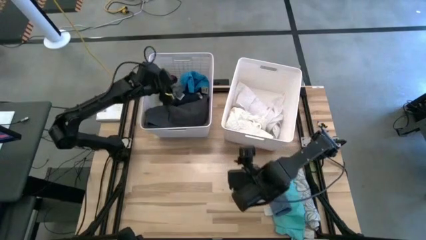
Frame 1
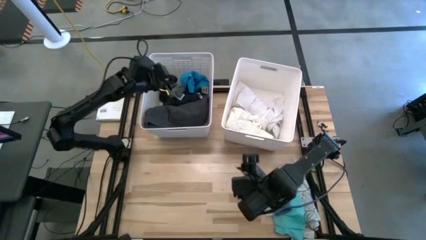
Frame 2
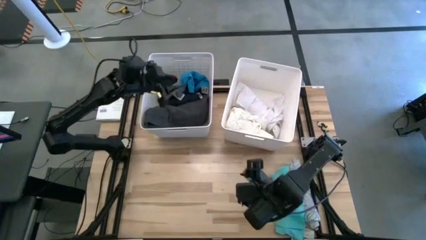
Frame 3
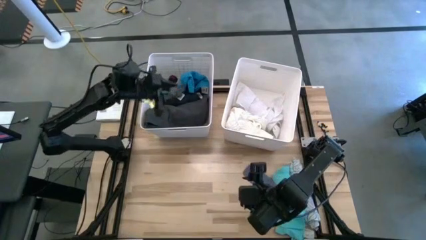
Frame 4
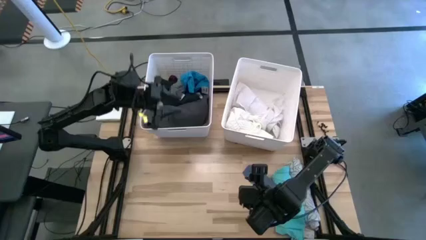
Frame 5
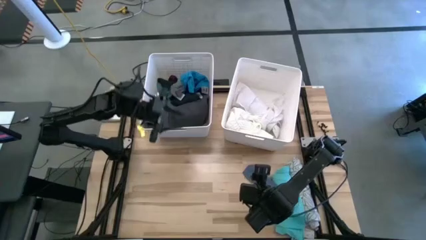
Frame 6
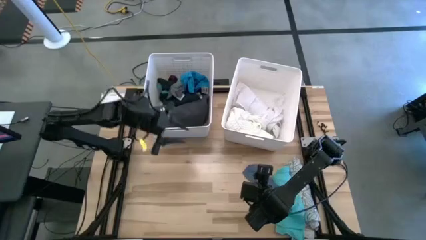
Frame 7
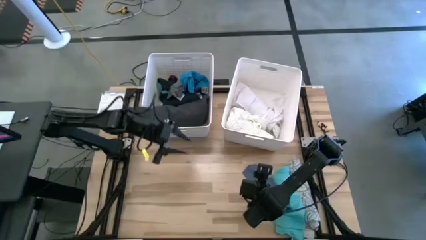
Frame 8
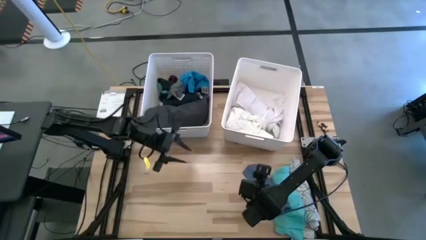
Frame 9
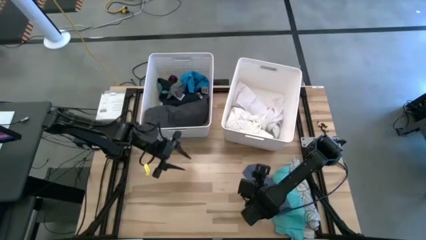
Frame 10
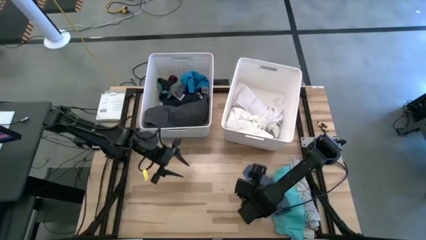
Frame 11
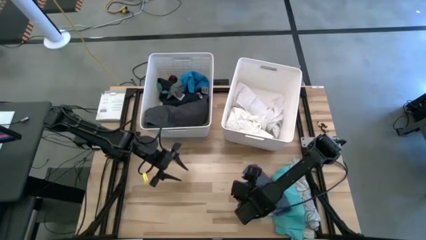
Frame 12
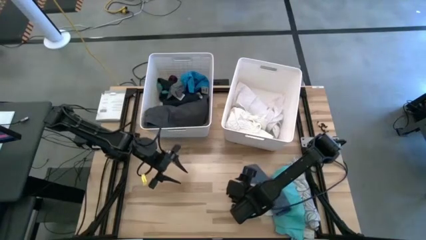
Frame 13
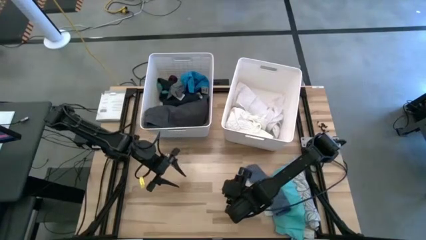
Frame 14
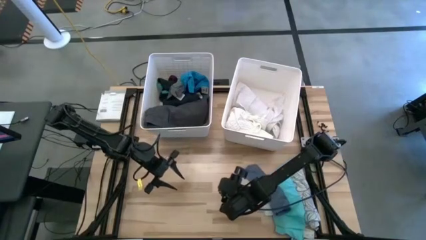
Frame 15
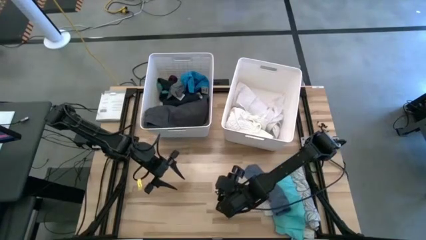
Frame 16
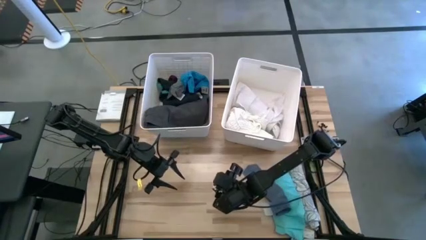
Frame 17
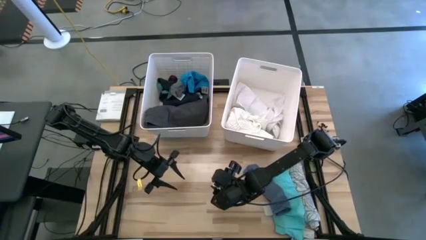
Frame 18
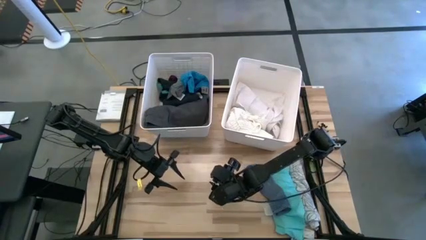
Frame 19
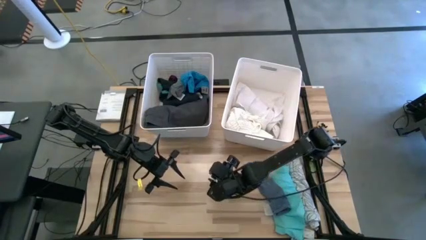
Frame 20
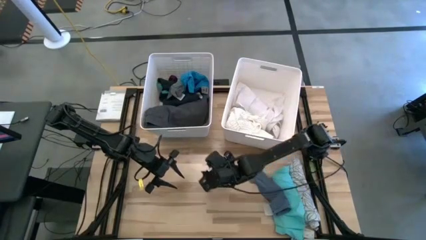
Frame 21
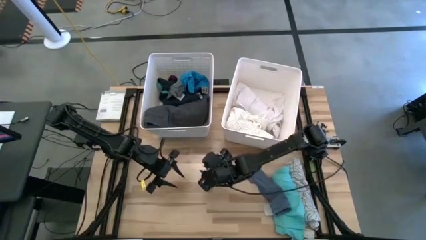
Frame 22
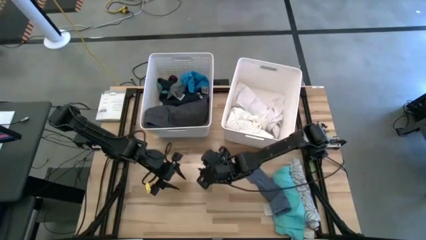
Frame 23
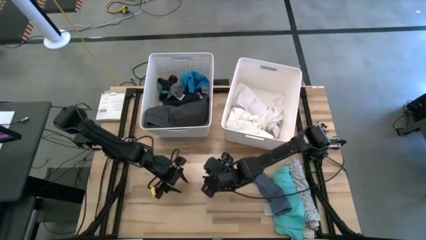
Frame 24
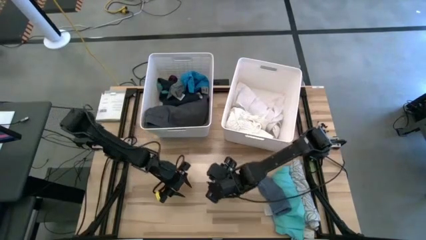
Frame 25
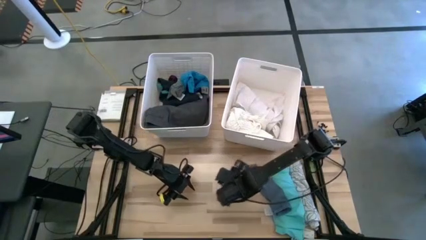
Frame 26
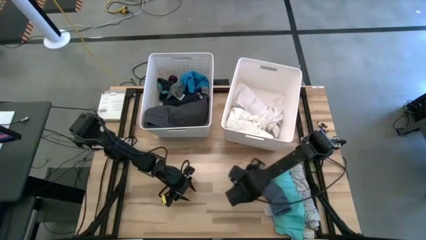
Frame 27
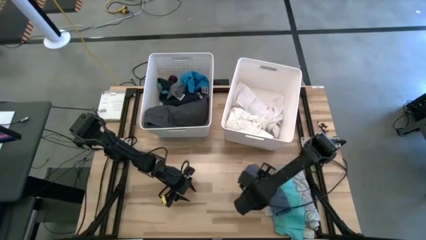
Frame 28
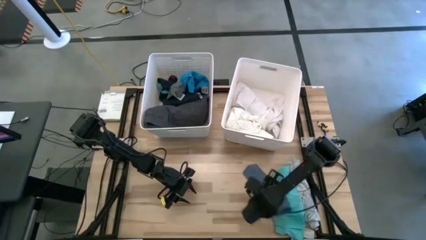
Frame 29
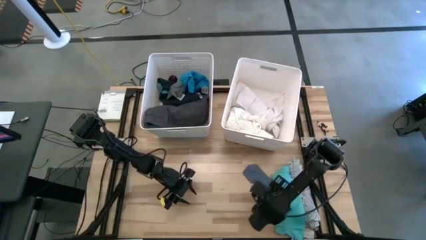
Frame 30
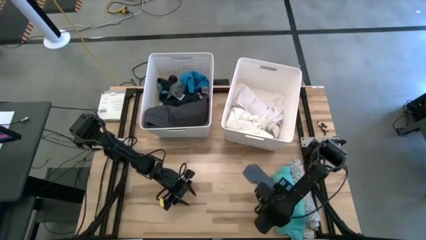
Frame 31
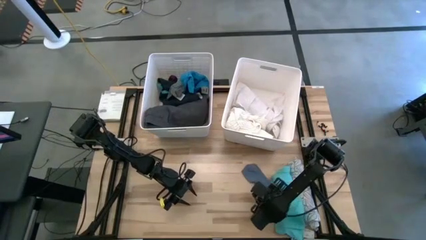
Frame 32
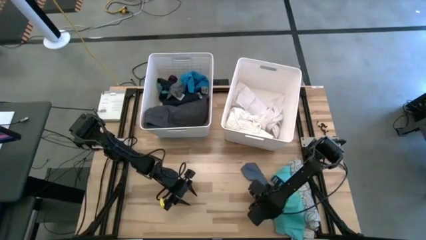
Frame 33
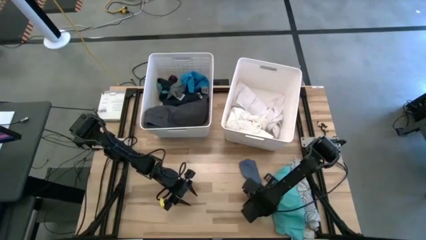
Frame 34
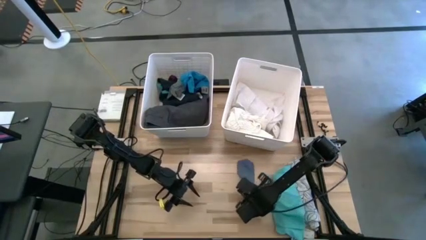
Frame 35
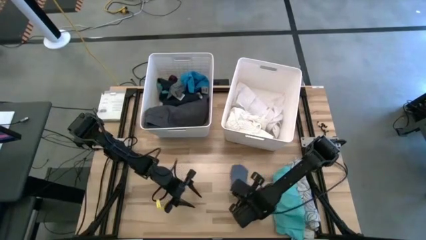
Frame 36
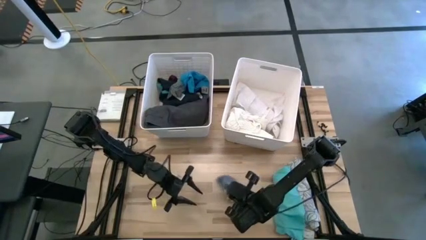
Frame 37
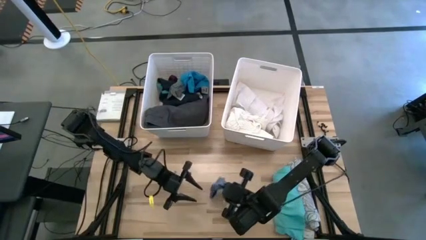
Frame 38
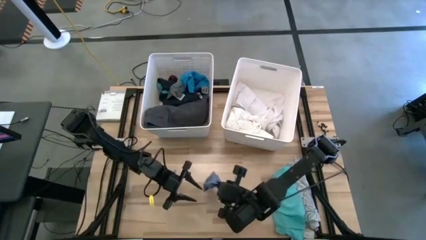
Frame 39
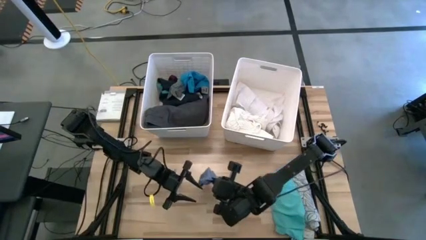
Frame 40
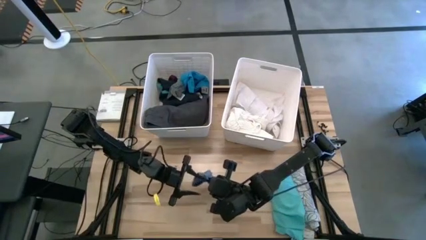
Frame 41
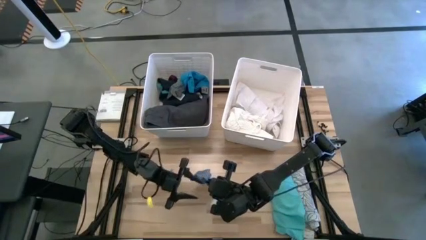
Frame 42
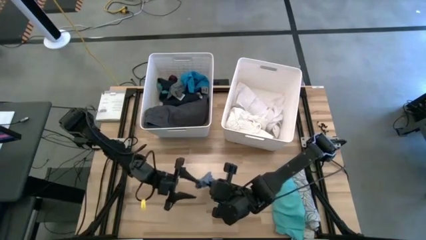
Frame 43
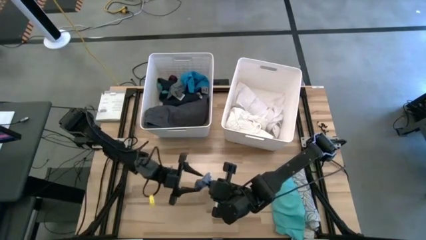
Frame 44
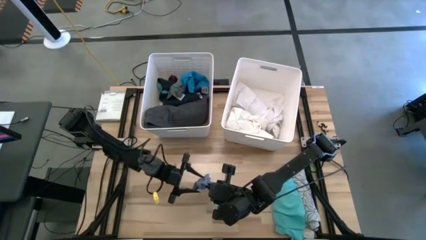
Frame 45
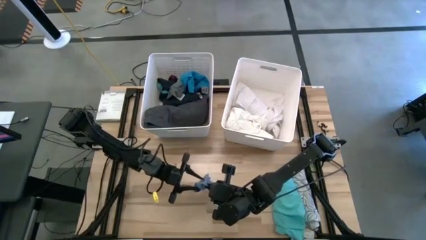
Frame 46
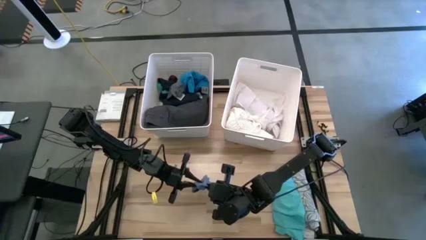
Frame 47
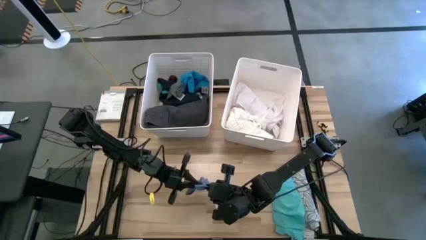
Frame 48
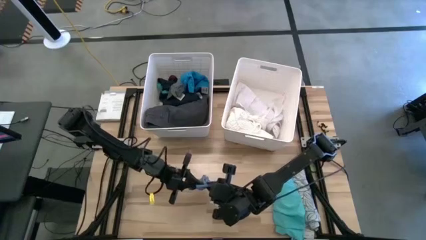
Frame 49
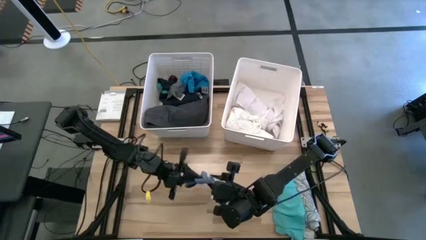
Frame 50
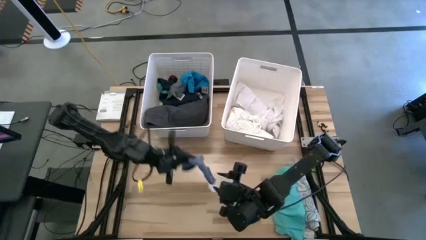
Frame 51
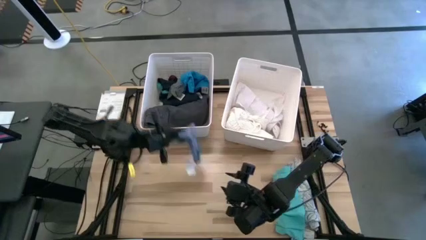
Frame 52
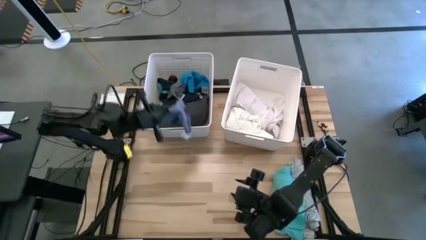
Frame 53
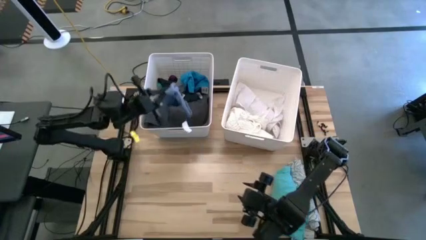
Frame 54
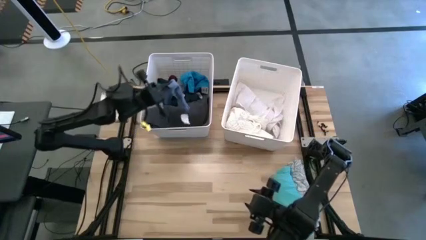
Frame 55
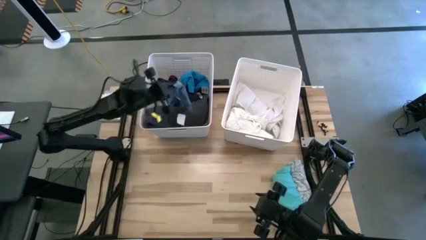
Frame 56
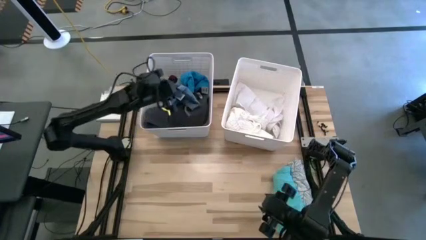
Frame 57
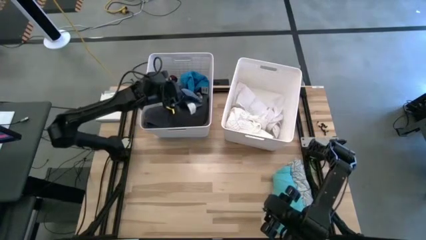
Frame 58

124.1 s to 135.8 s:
Task: Sort clothes
Put the blue sock into the left white bin
